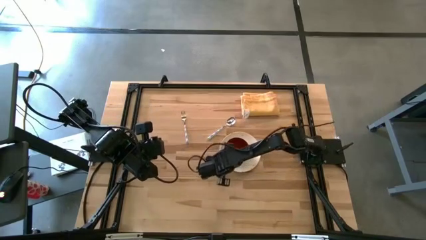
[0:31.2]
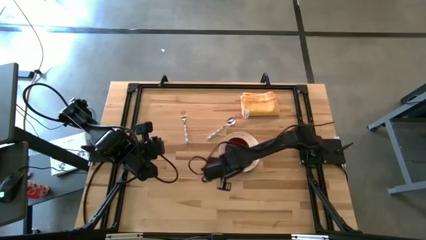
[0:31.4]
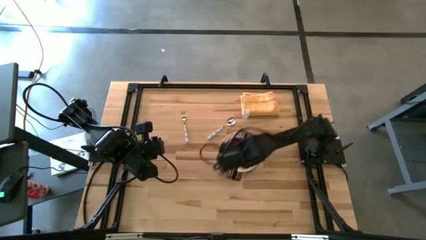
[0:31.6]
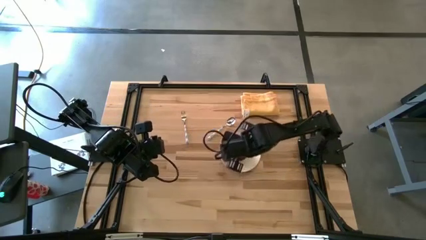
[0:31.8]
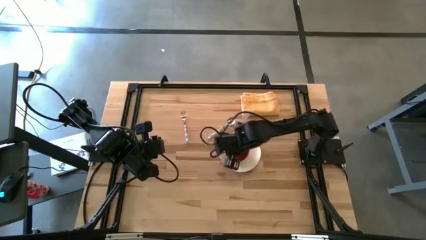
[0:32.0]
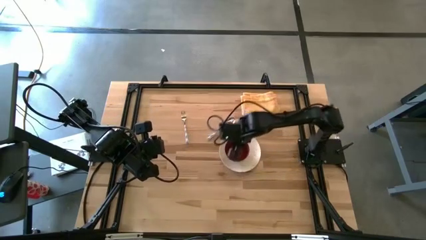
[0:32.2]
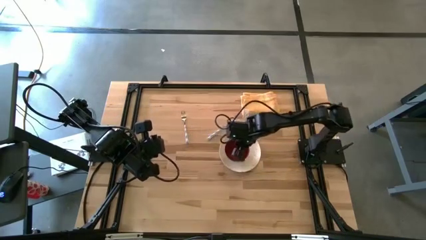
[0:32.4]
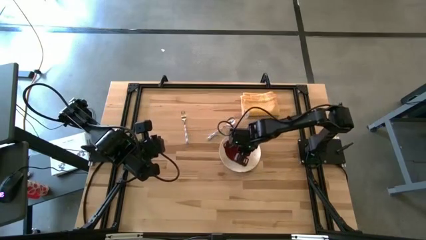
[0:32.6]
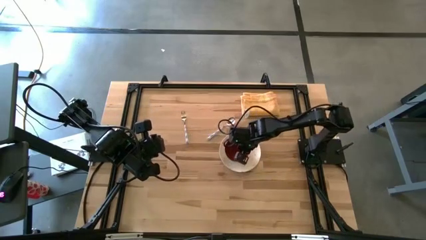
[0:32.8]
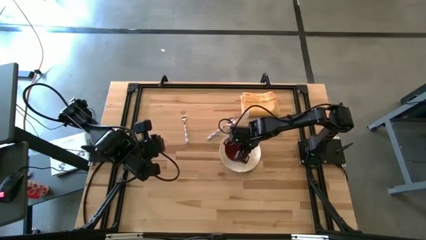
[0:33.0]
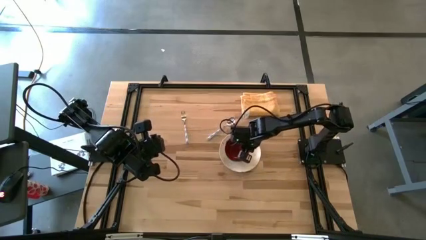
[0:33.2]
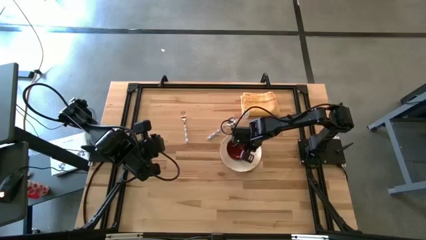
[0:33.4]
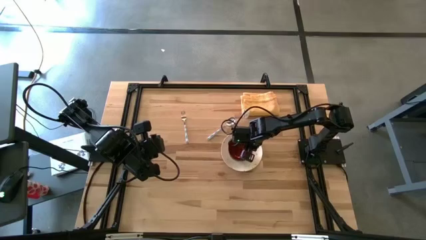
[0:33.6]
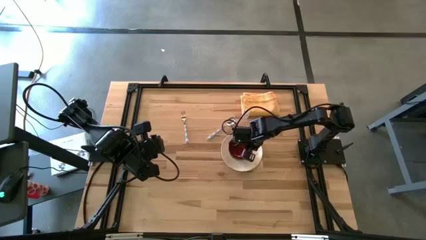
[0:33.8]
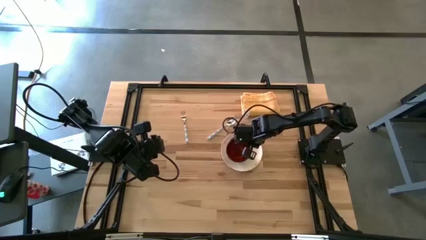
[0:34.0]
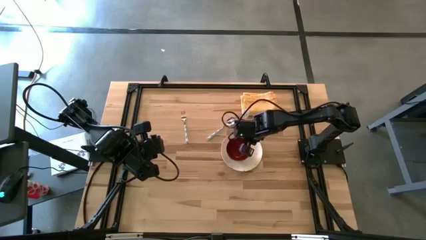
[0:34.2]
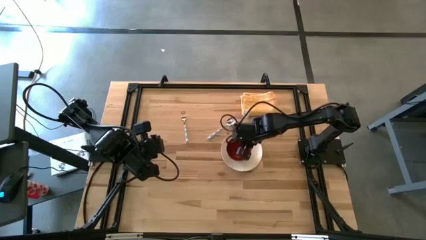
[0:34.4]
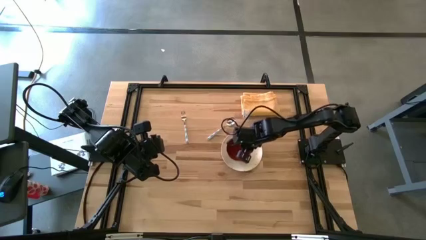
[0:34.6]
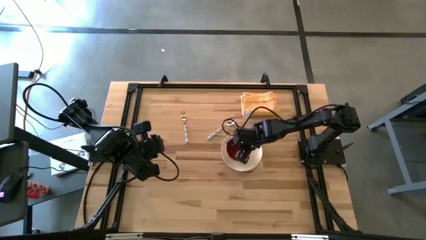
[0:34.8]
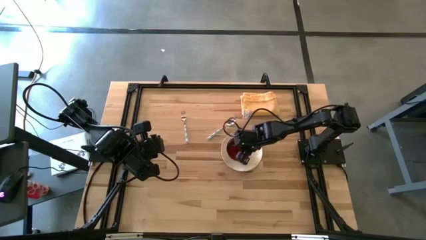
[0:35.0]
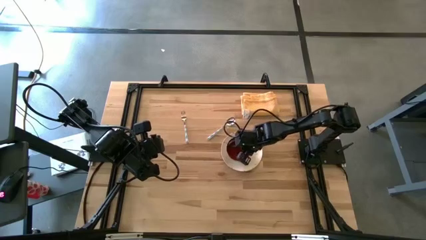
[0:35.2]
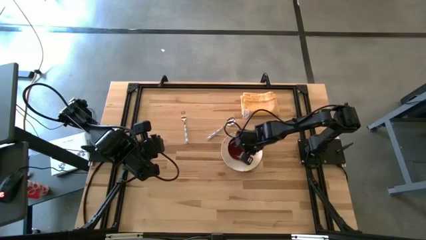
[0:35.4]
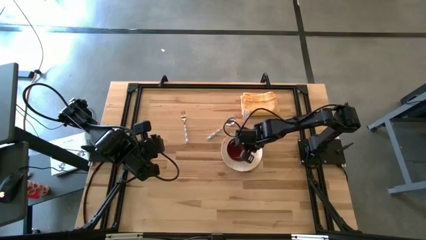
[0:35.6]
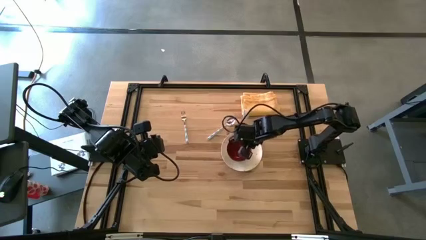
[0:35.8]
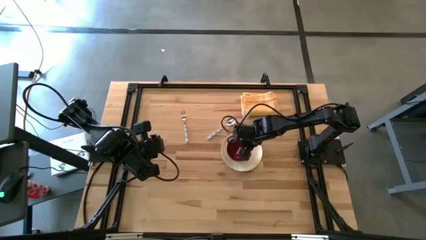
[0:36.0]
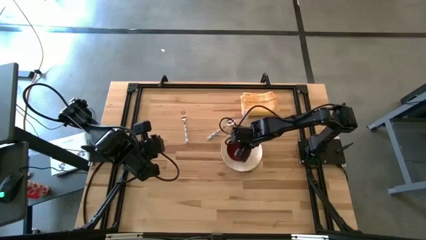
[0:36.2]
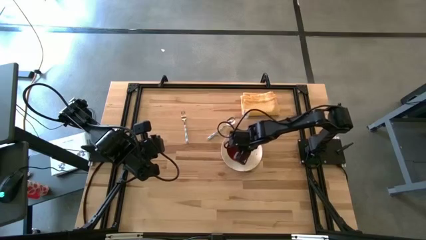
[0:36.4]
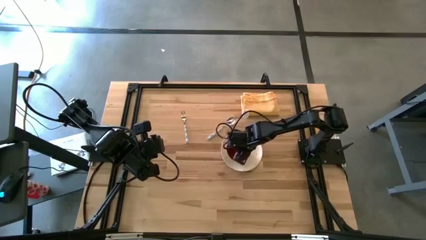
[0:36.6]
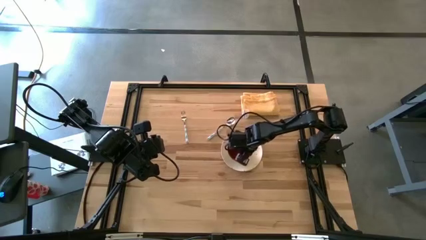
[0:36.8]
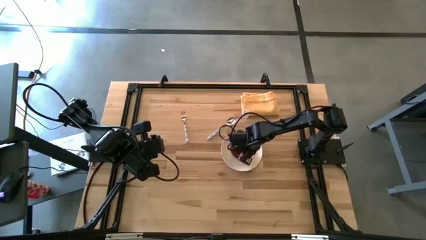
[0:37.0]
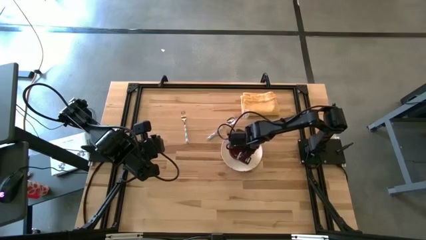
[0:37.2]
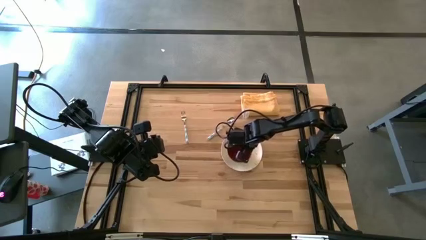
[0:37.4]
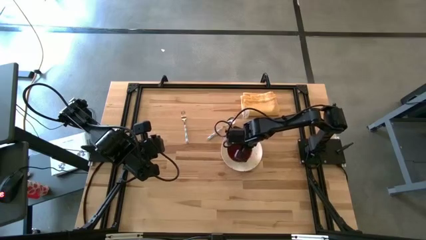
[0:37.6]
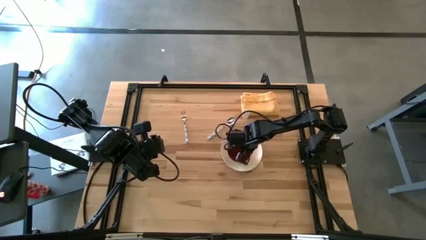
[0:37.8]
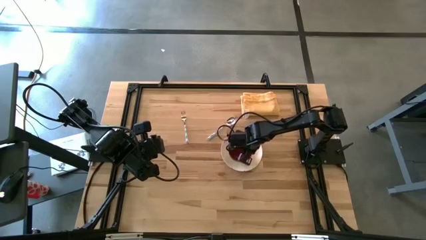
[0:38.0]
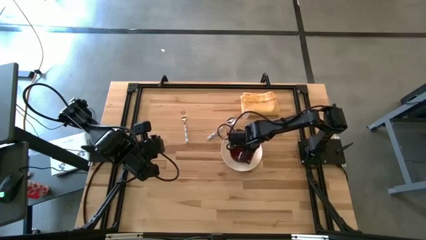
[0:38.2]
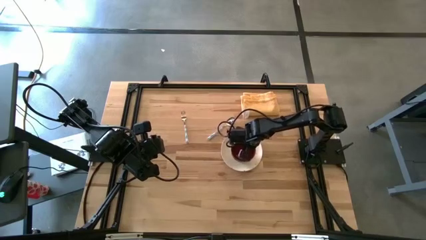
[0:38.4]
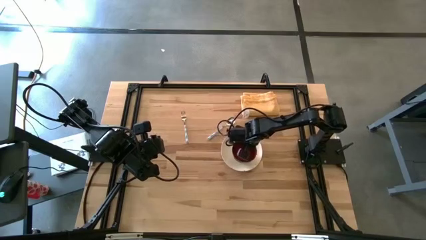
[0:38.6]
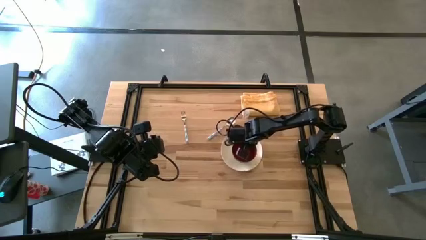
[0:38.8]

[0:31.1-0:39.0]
Task: Set table place
Adjust the black bowl on the white plate

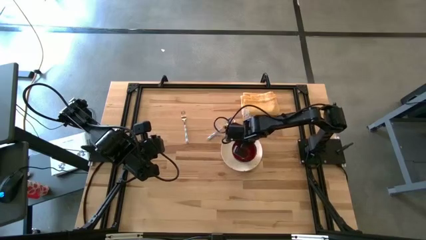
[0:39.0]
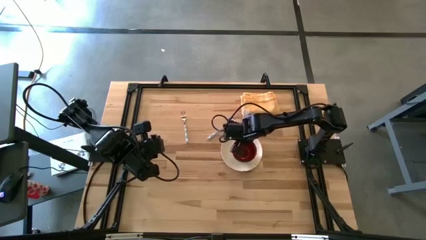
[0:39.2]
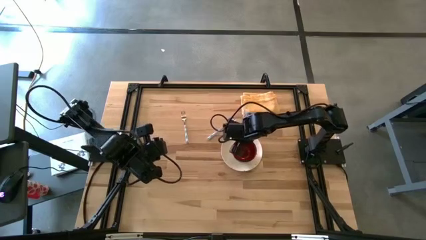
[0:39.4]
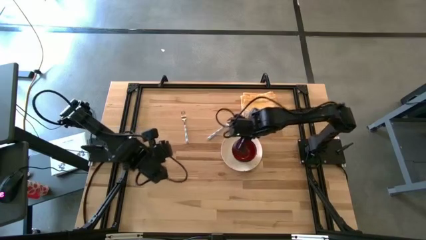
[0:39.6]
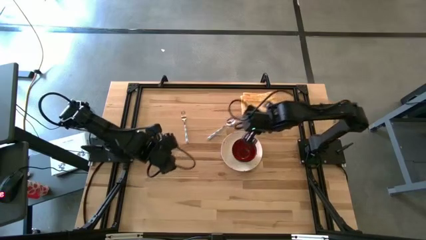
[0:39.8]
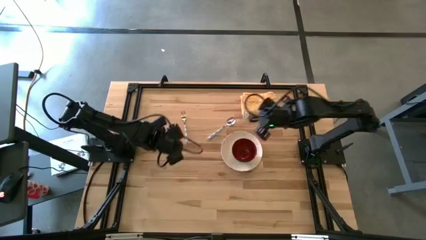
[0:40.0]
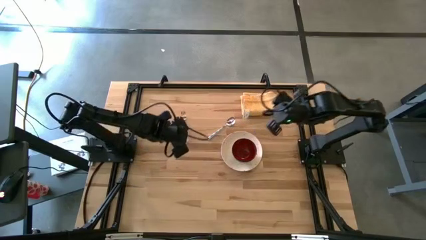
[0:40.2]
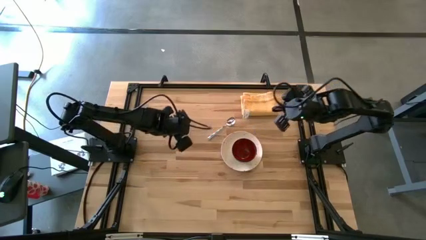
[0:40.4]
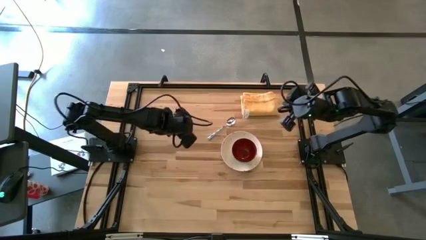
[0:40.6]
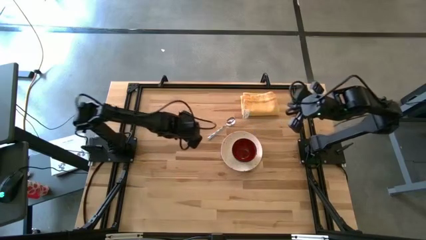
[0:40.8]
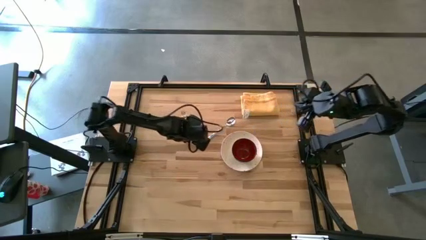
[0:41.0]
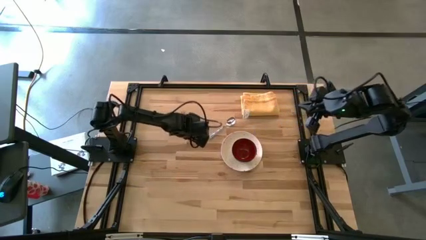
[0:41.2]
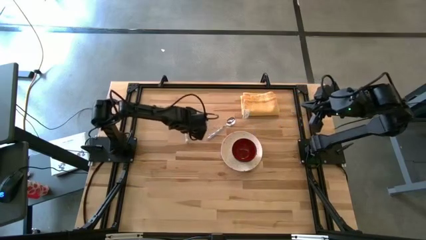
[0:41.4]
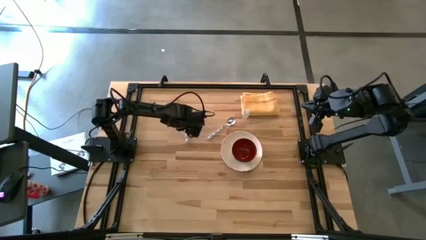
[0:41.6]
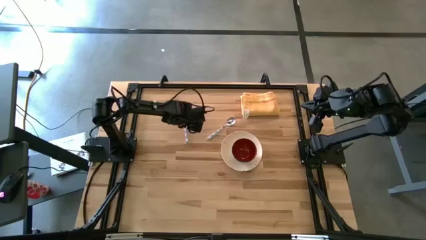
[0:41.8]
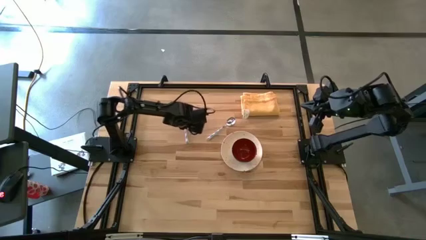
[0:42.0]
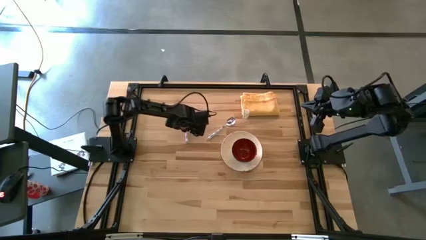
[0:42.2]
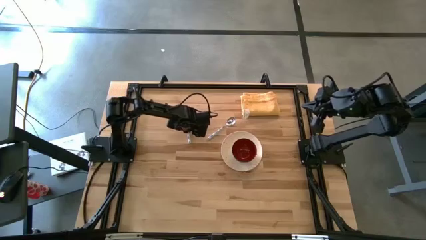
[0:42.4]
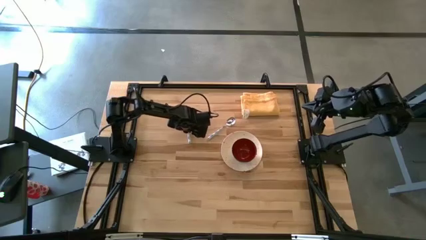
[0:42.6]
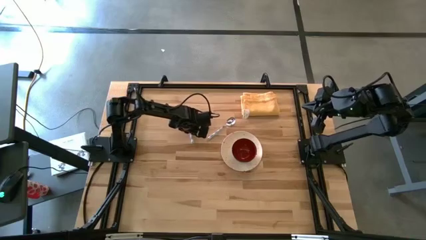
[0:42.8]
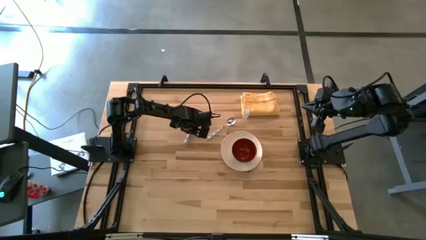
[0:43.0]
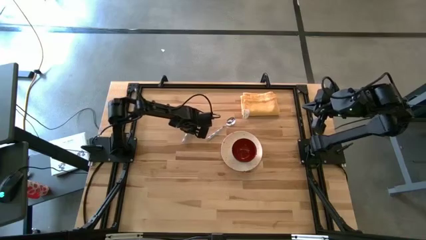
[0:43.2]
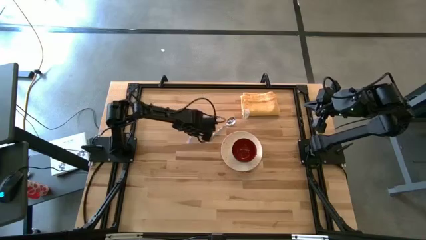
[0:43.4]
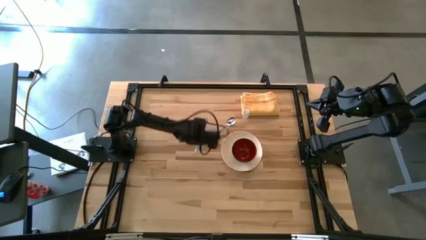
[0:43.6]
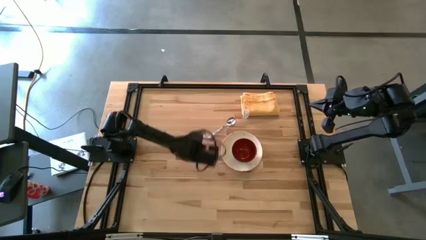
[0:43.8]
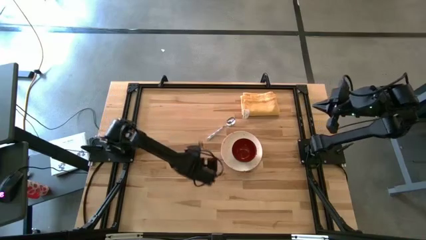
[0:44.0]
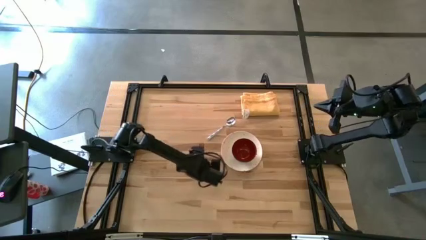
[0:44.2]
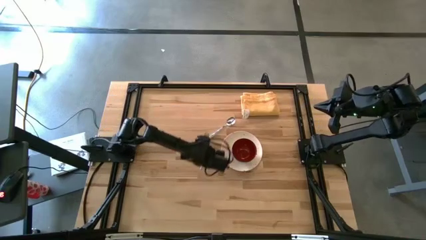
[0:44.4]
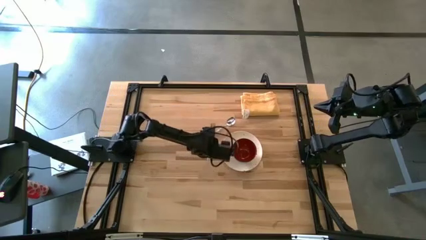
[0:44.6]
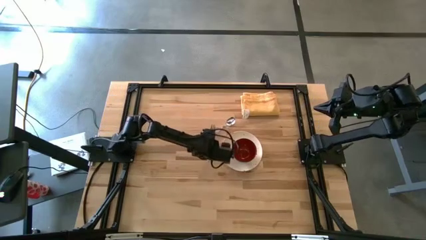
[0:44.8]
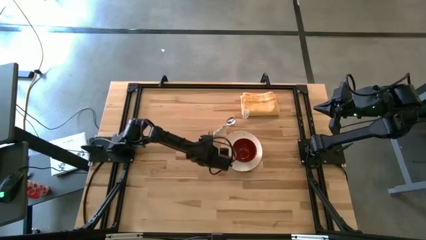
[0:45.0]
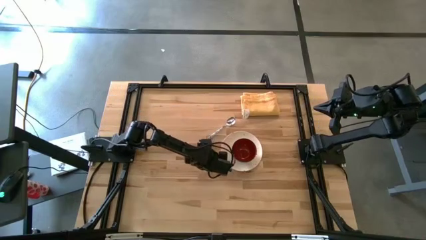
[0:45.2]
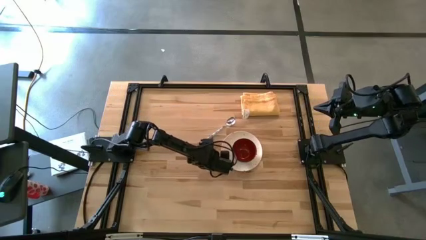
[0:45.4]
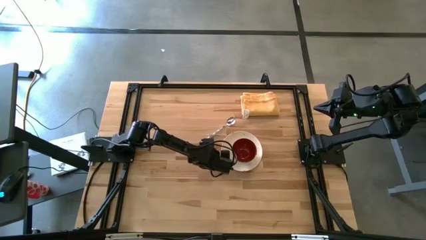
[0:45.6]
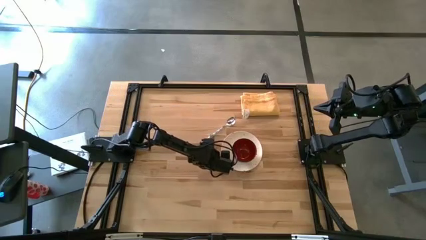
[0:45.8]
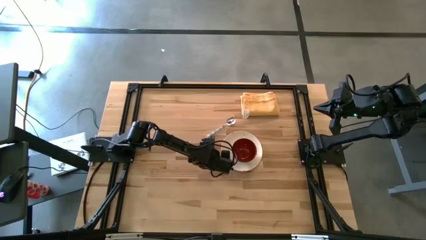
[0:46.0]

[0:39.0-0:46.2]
Move the fork to the left of the white plate
